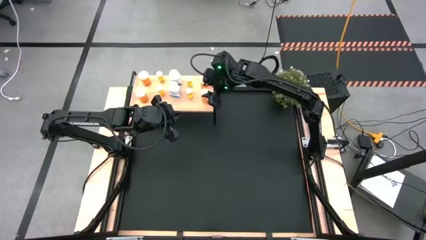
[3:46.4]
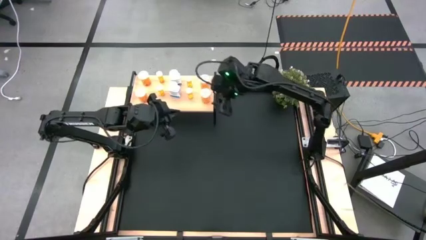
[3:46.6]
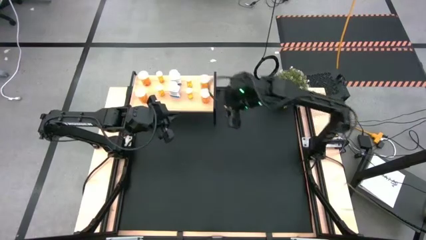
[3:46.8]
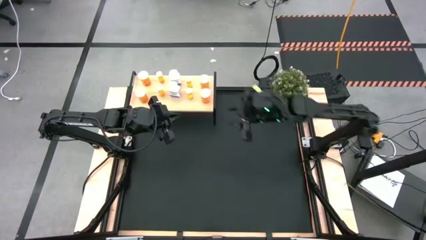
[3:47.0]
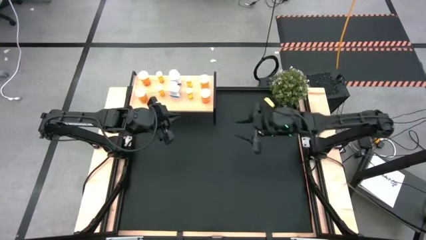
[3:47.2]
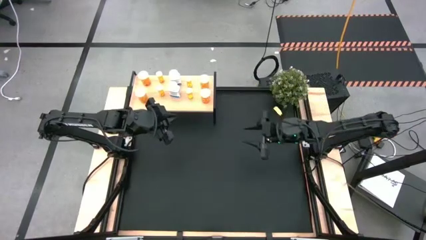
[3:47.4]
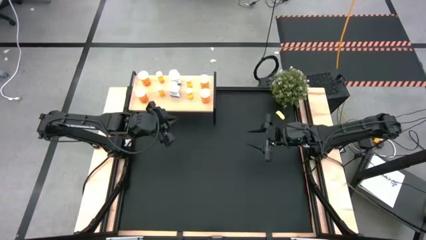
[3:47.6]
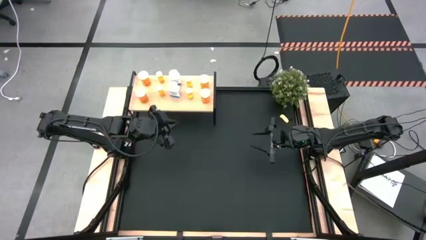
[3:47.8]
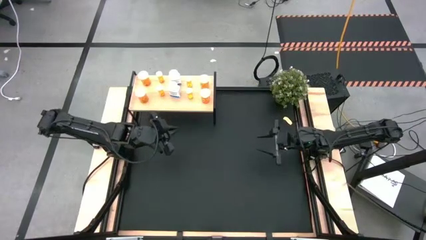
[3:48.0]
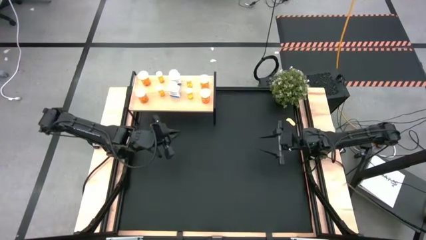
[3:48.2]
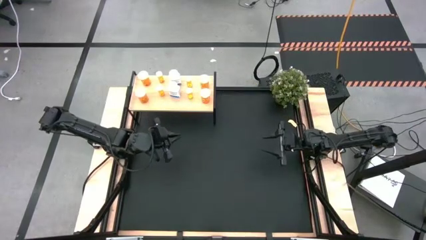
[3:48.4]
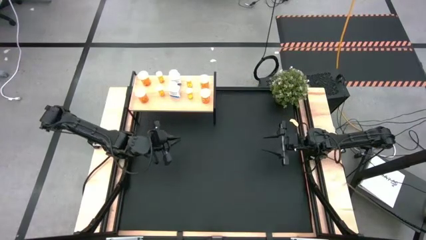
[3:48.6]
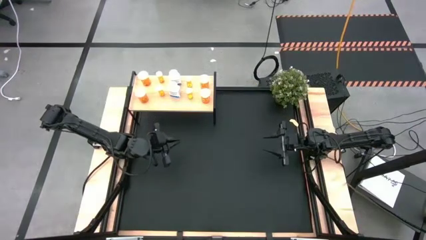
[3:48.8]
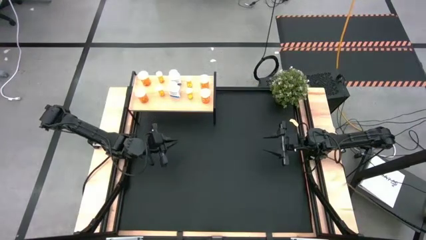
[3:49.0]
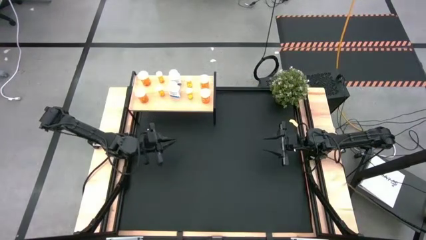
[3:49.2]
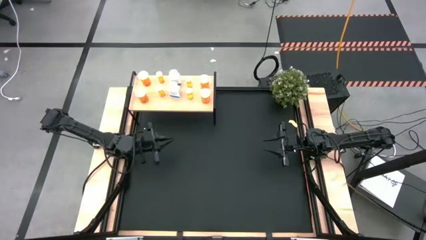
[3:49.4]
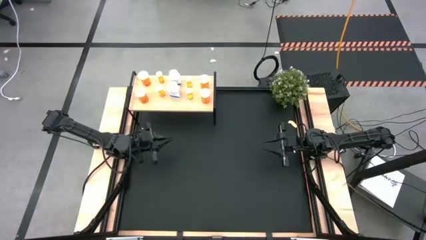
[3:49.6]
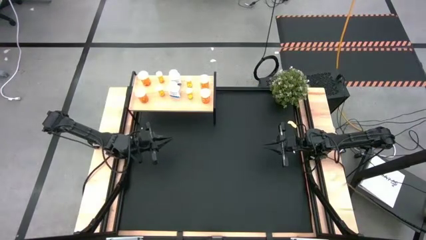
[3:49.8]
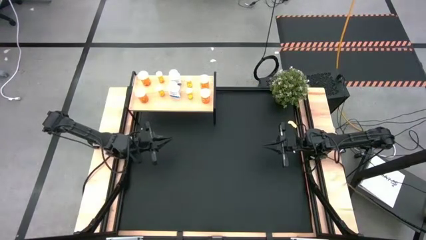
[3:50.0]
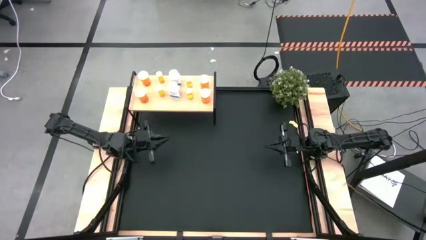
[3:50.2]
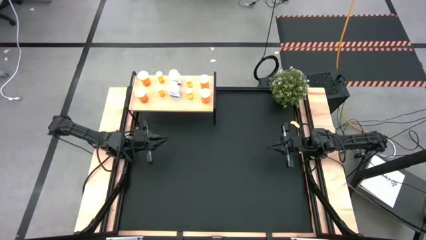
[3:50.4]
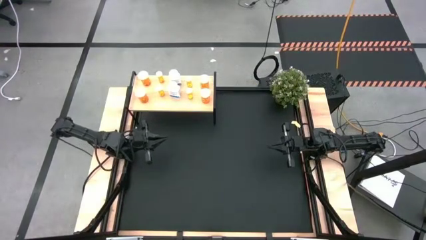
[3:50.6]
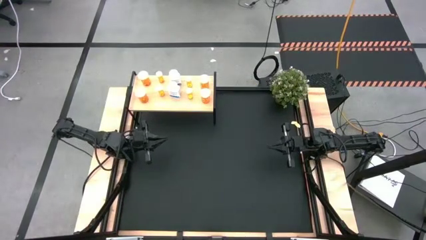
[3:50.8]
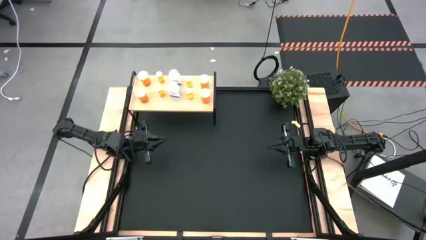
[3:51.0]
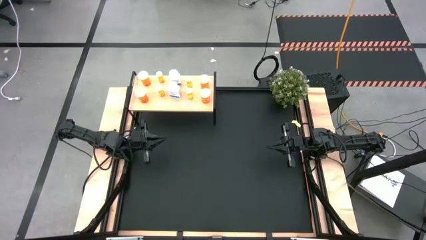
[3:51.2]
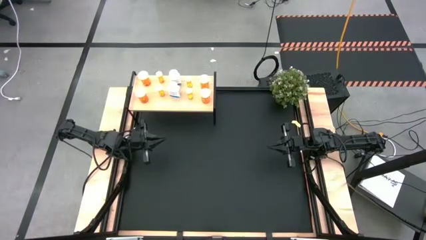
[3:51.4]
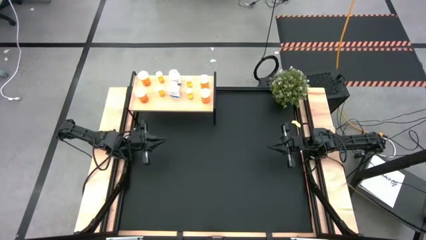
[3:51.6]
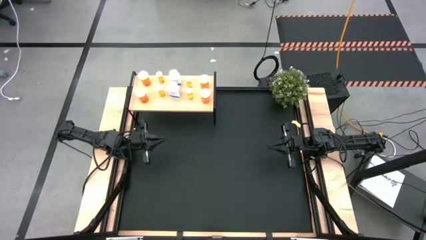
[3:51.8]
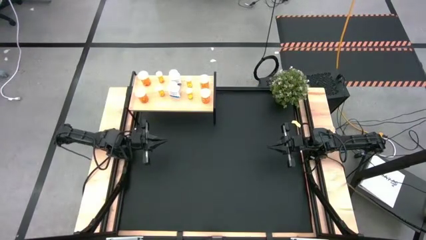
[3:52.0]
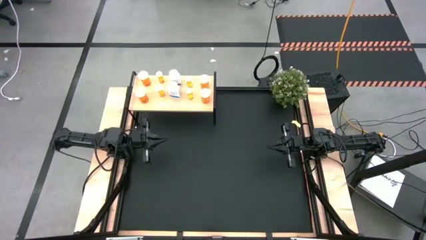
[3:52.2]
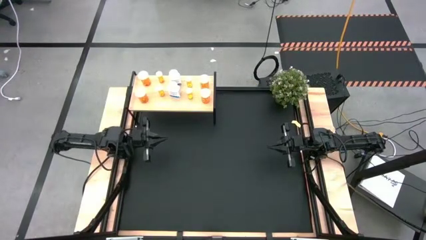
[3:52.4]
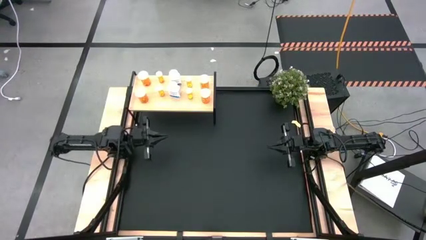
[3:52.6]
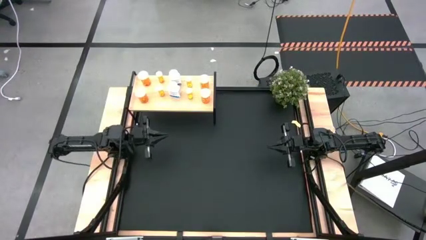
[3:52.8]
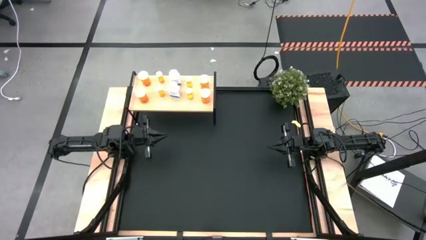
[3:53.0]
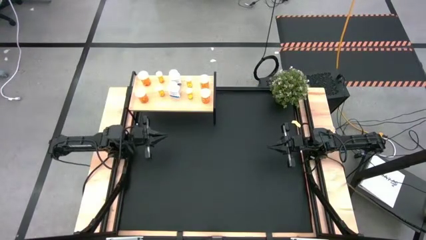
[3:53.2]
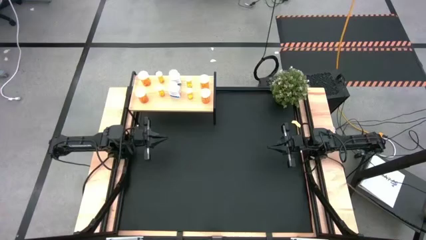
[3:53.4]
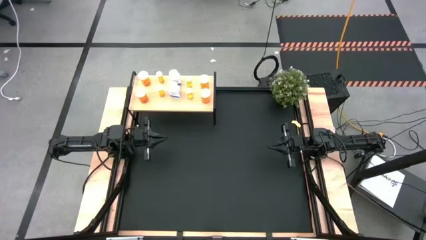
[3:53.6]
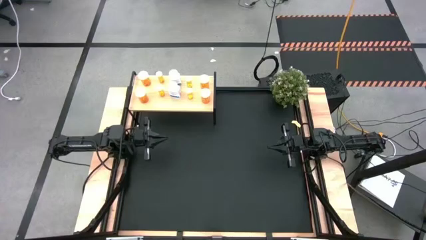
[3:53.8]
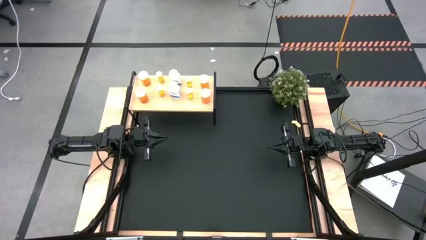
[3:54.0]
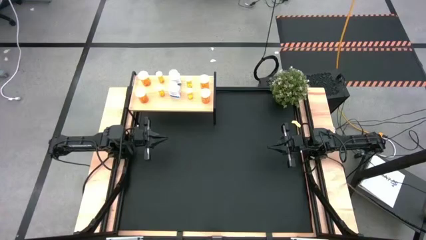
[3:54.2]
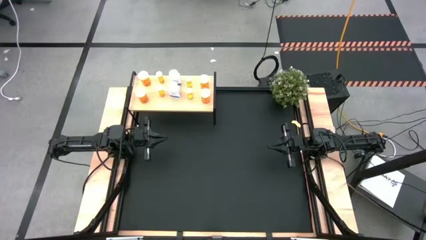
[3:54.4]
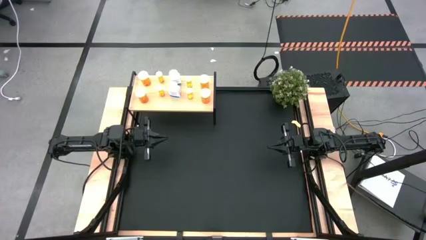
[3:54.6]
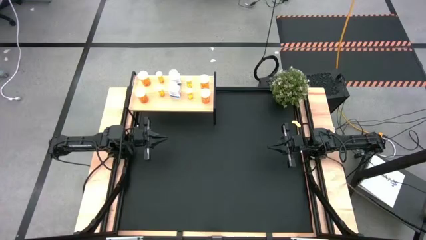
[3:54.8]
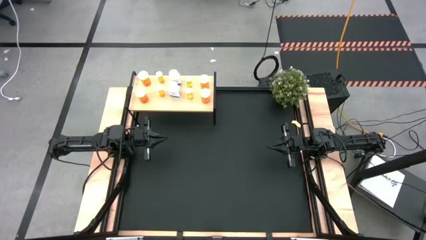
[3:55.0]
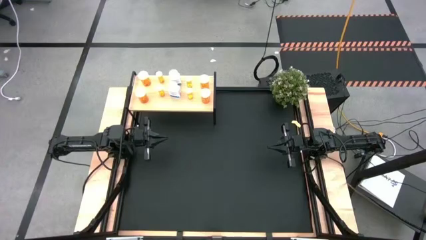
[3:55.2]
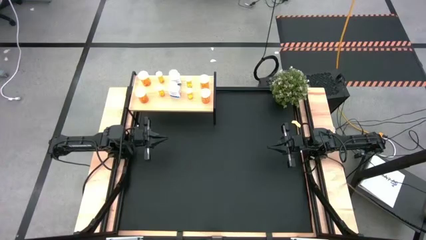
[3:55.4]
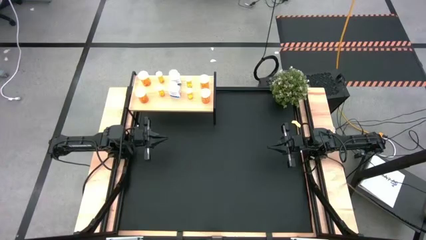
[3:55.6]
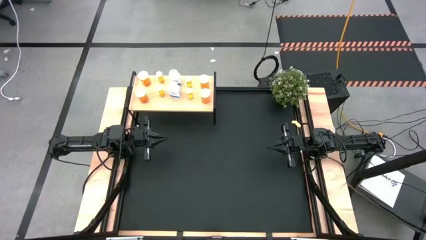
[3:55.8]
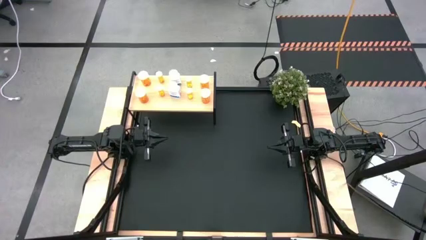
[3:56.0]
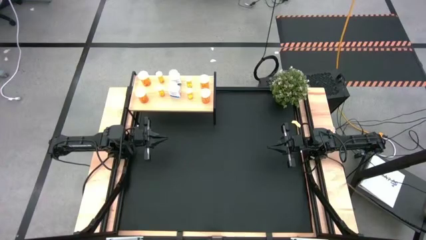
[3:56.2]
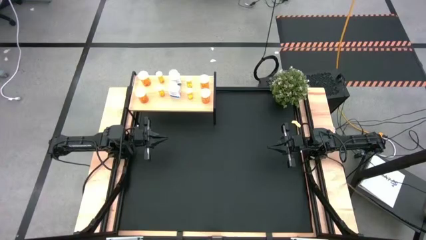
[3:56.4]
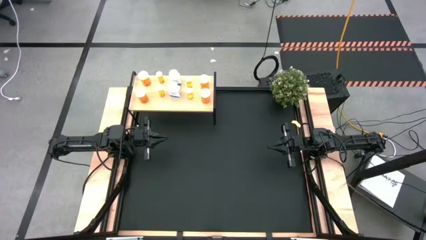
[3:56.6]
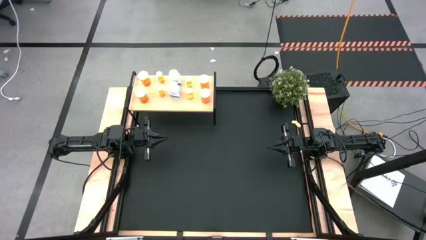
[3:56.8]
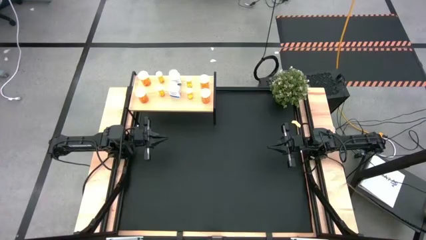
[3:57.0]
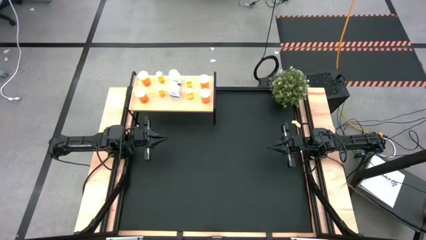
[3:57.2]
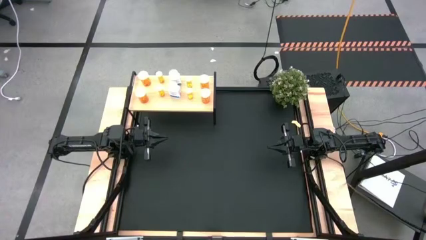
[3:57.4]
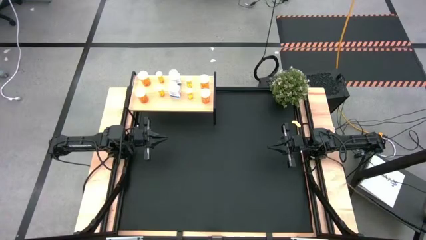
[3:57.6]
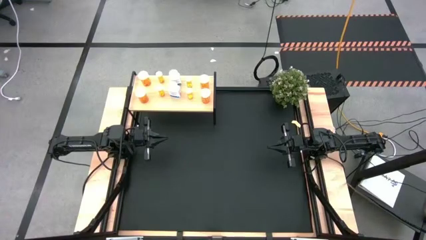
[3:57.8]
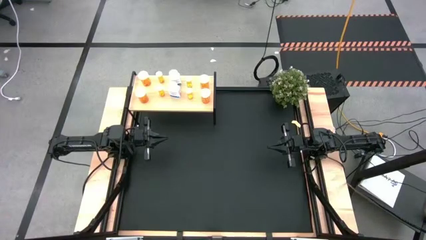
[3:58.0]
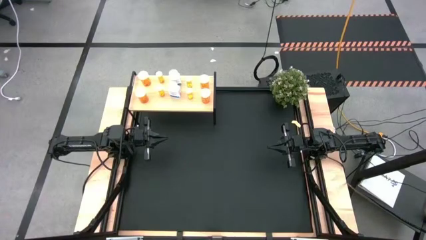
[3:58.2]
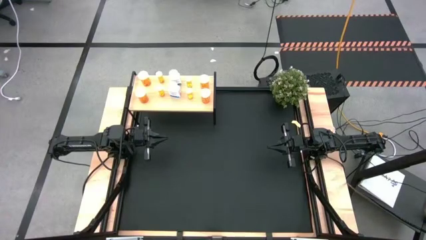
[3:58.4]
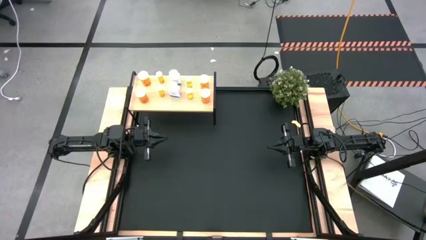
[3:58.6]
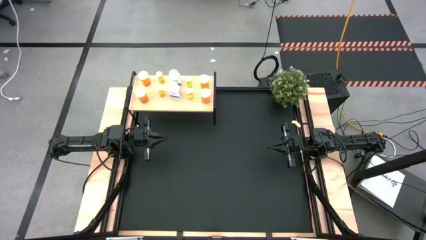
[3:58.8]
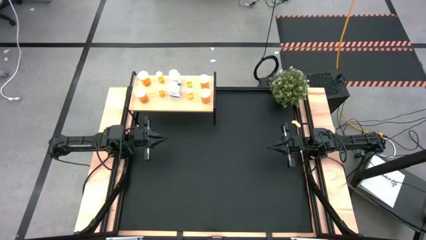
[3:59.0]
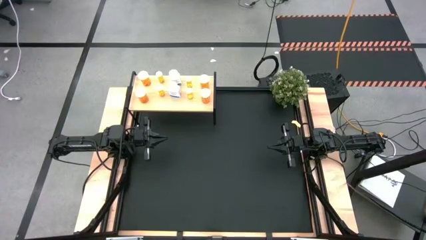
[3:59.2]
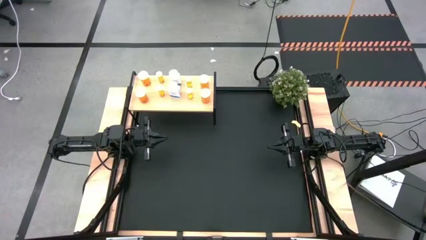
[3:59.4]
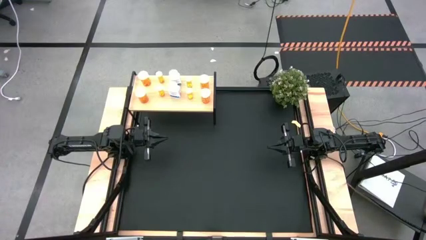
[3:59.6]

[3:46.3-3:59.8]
Task: Pick and place medicine bottles onto shelf by color
Return to Home Position
